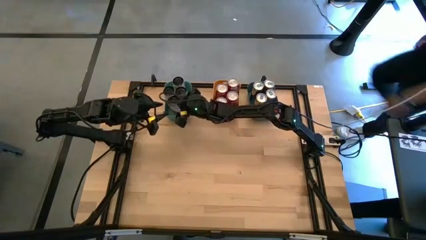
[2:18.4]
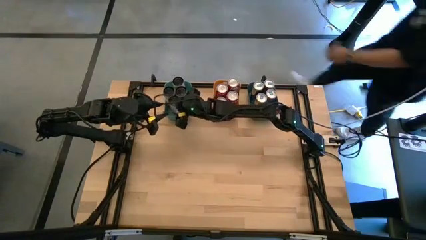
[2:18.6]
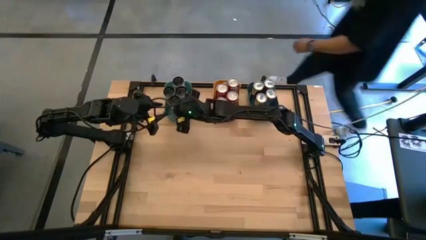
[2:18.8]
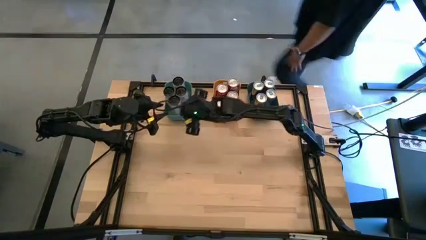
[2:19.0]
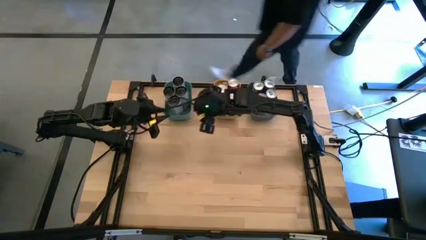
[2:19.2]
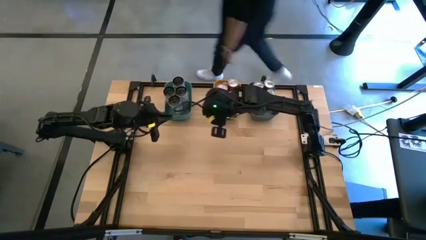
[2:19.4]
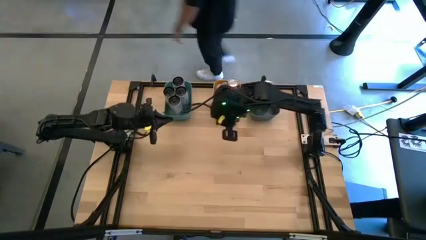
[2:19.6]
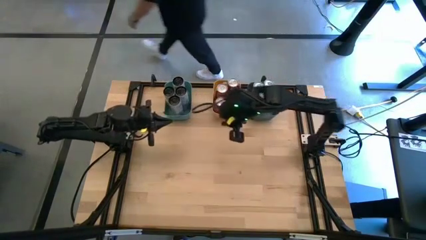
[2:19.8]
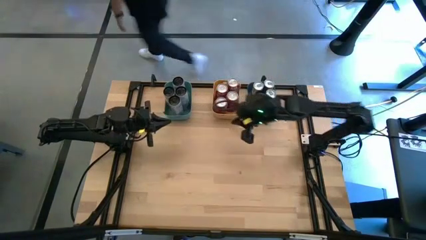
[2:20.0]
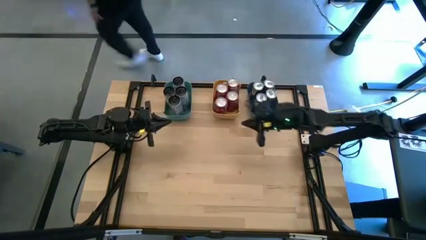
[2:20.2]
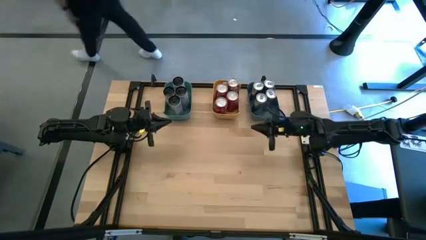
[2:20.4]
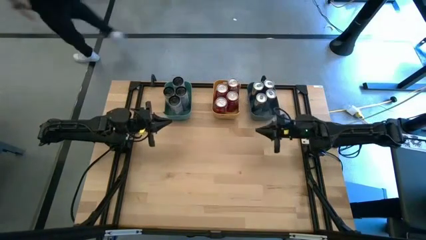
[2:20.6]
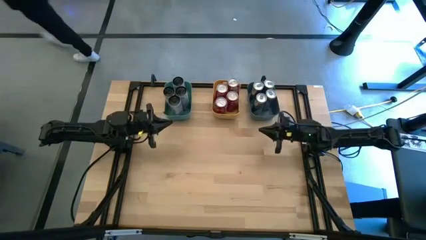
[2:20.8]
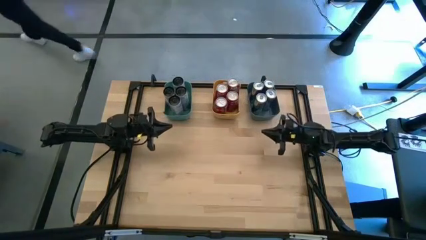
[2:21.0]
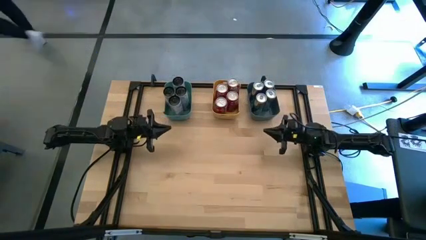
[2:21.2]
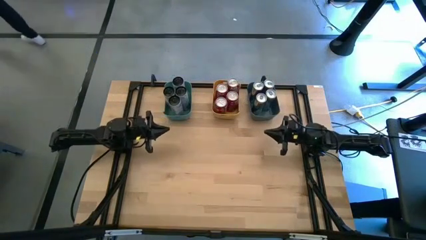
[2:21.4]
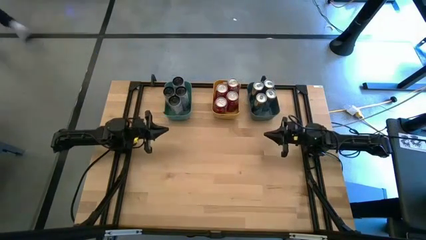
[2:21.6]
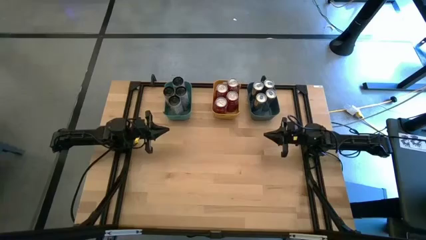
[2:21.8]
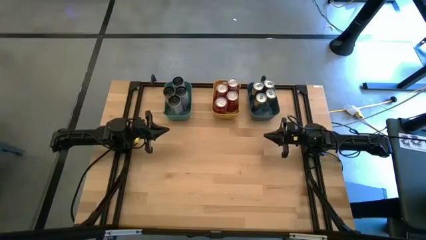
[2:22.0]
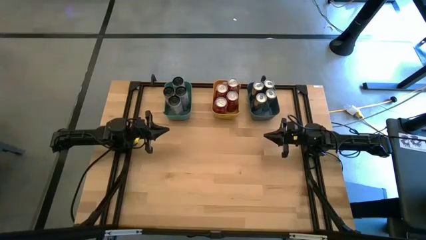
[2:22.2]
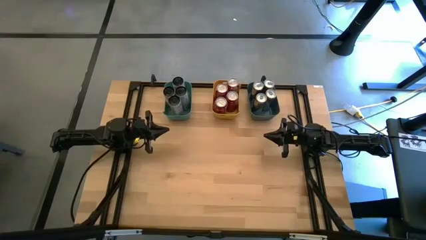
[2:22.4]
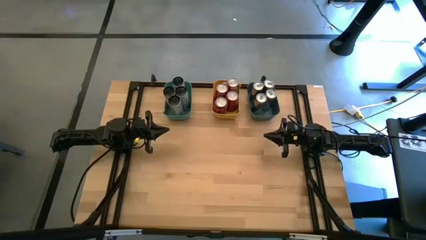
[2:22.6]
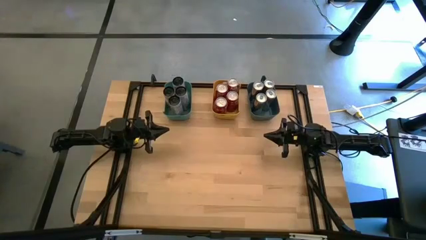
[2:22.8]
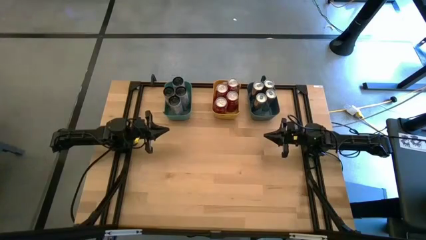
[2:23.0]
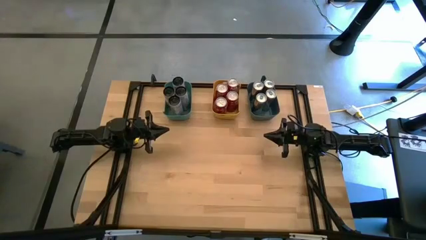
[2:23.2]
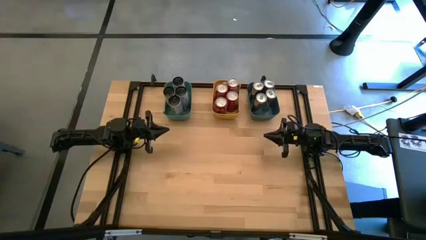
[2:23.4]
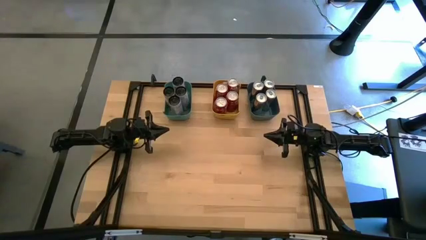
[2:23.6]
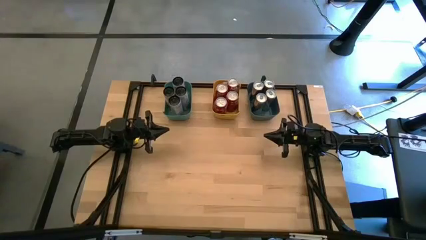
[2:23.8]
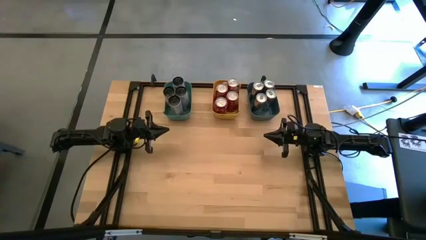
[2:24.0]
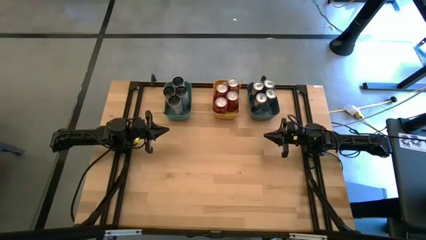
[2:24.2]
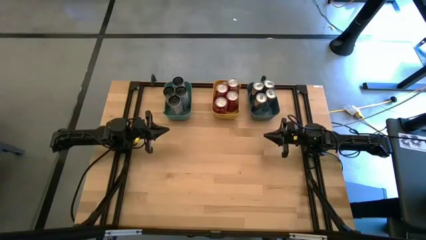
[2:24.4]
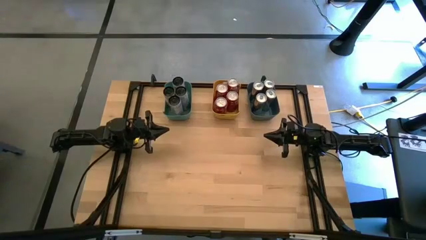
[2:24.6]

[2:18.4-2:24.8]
Task: Sort soda cans
Return to Home Position

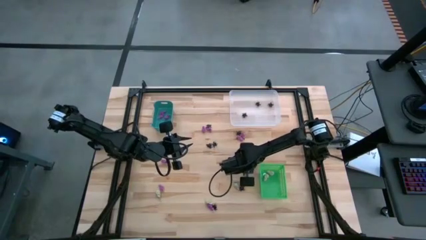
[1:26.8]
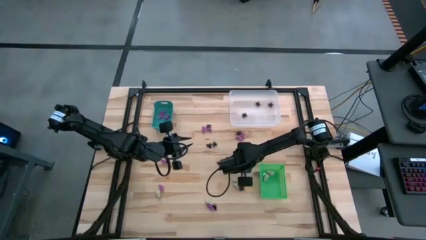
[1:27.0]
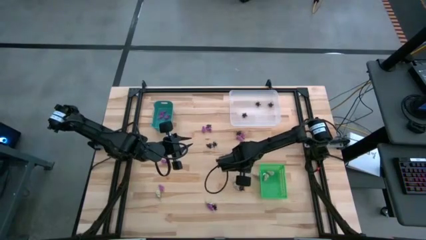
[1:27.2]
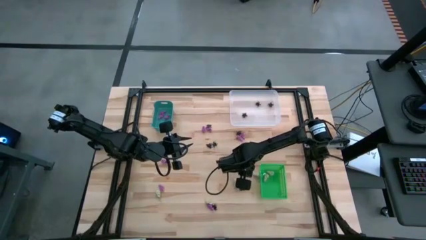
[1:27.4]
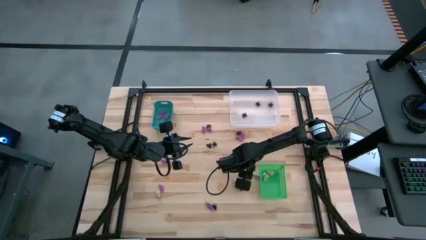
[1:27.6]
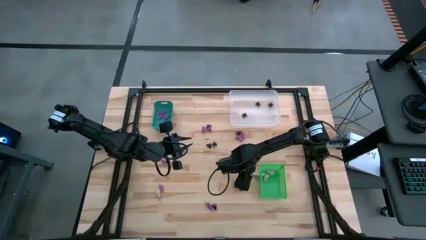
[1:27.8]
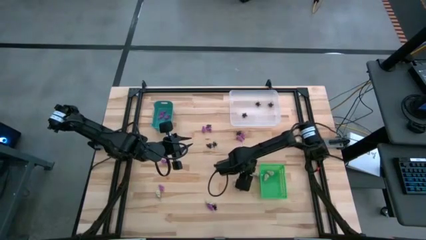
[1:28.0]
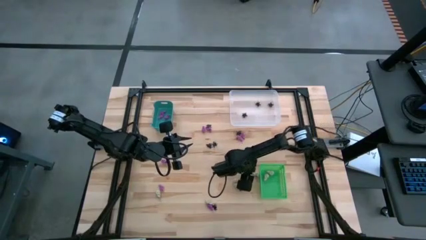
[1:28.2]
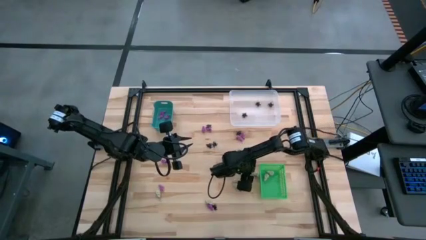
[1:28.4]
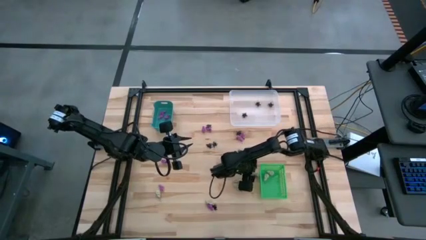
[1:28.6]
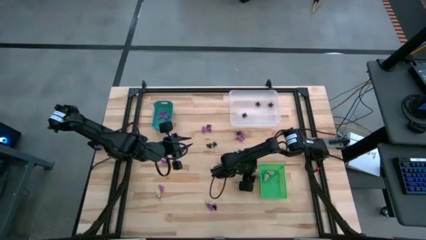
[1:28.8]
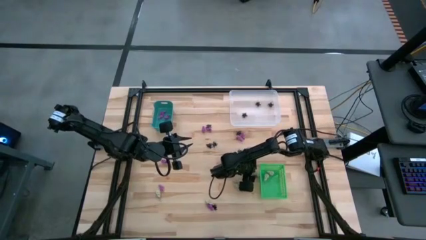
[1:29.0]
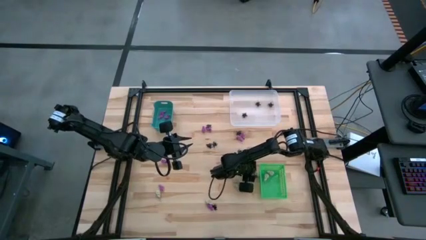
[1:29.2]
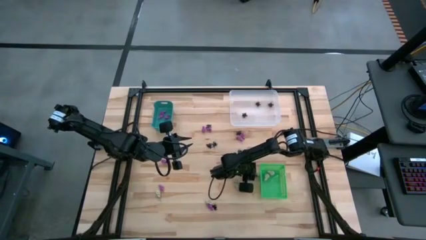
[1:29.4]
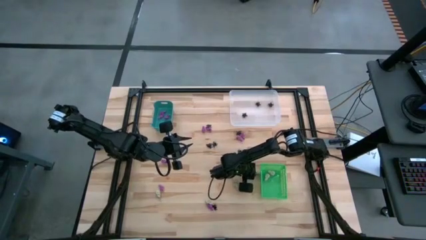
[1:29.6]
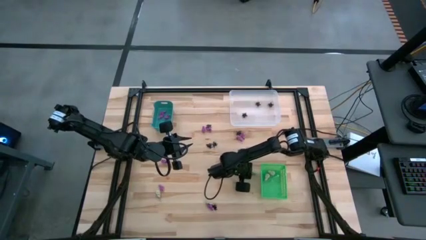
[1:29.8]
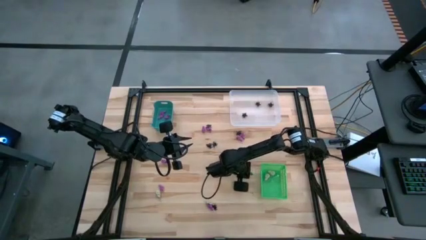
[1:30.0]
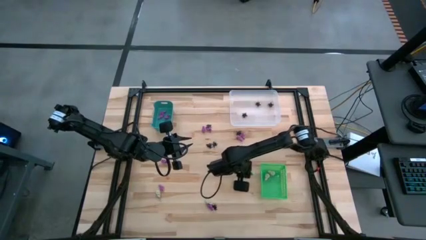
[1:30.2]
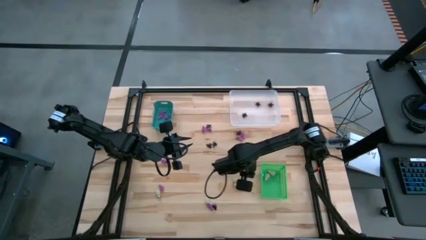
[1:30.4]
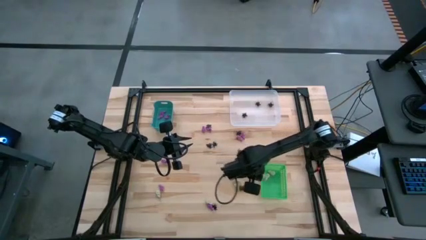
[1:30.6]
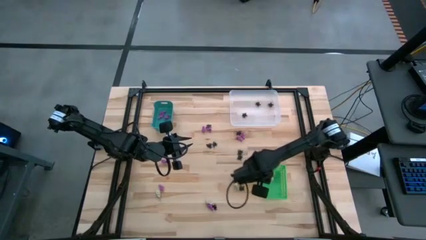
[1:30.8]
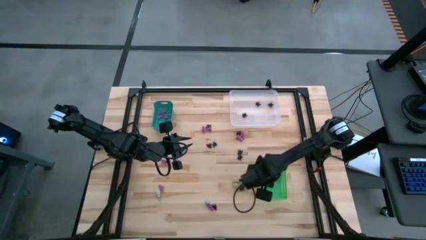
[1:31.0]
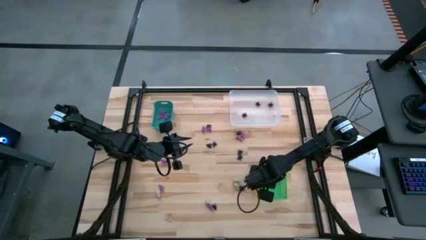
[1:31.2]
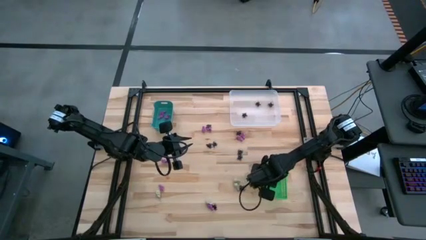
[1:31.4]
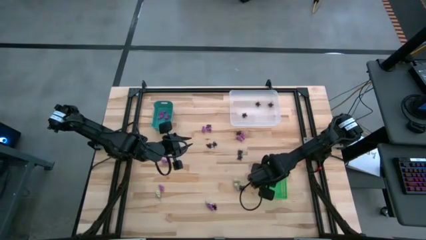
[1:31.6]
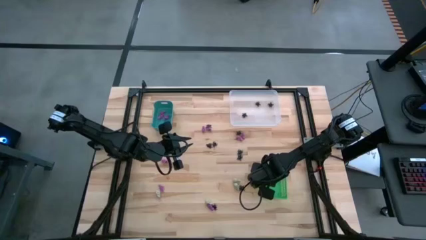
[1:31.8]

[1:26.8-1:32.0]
Task: Sort Halloween decoration
Put the white skull toy into the green bin

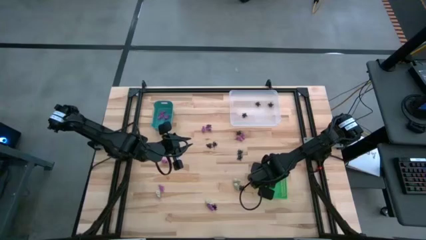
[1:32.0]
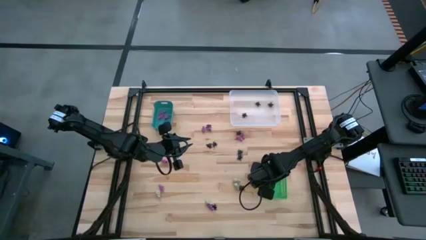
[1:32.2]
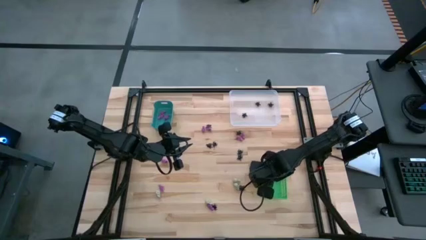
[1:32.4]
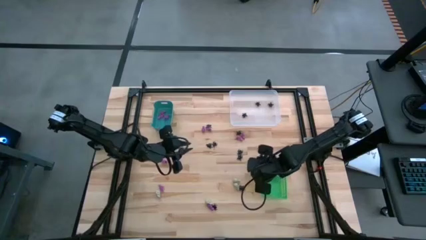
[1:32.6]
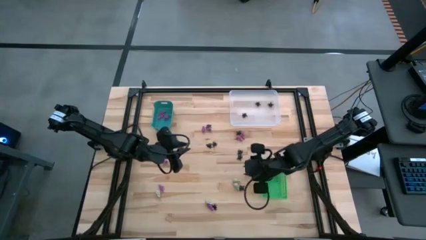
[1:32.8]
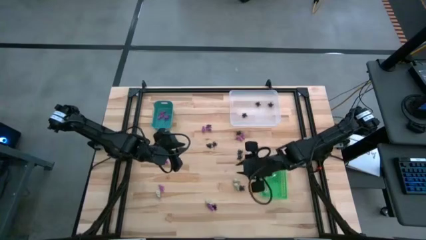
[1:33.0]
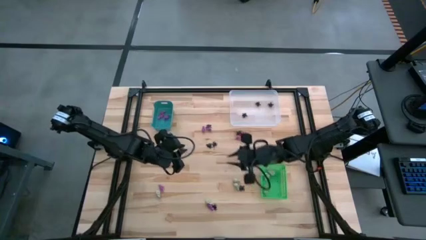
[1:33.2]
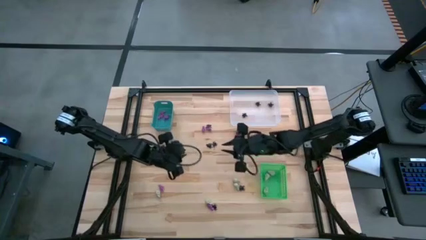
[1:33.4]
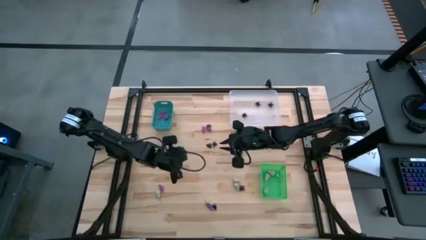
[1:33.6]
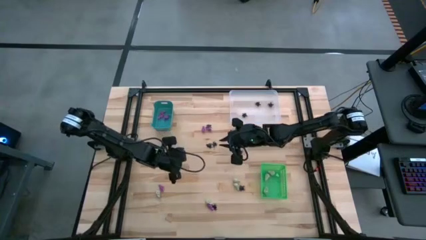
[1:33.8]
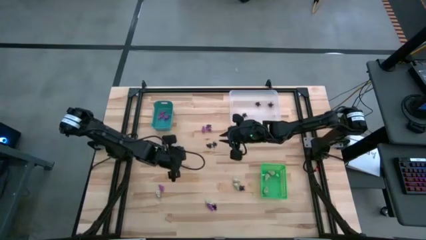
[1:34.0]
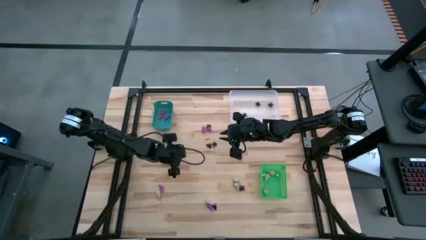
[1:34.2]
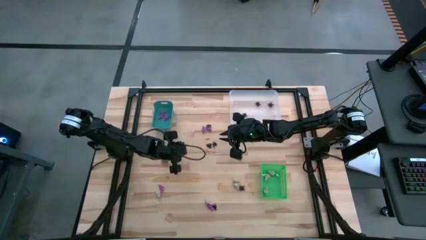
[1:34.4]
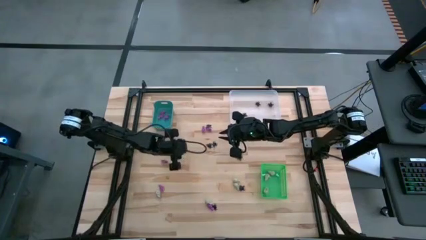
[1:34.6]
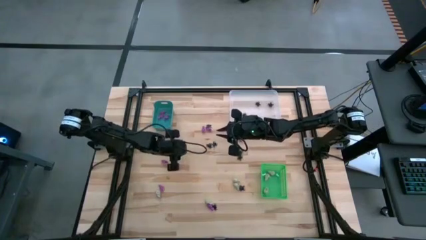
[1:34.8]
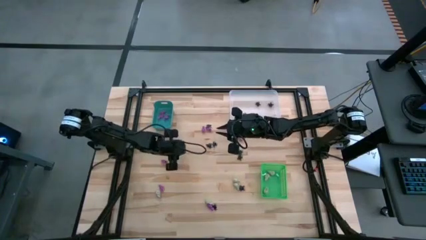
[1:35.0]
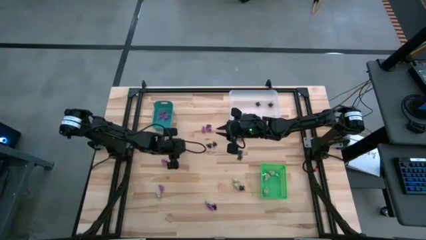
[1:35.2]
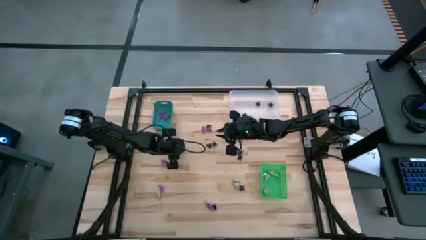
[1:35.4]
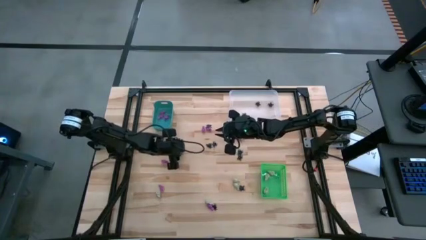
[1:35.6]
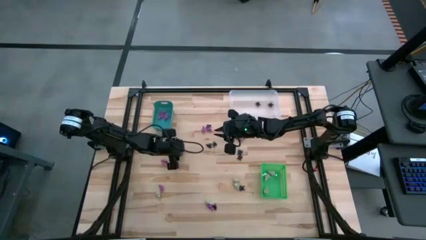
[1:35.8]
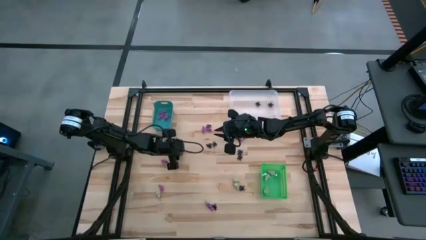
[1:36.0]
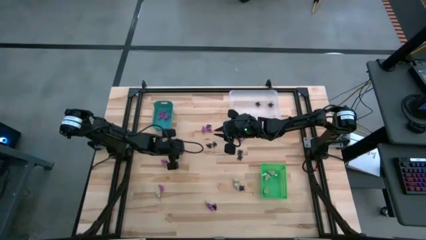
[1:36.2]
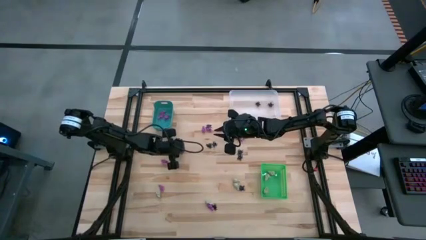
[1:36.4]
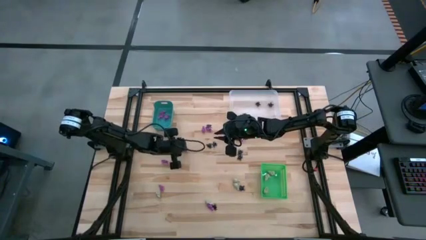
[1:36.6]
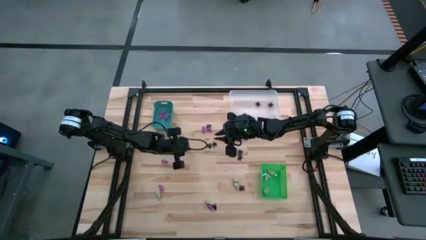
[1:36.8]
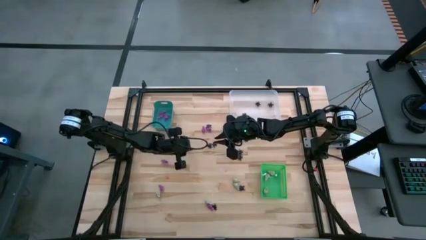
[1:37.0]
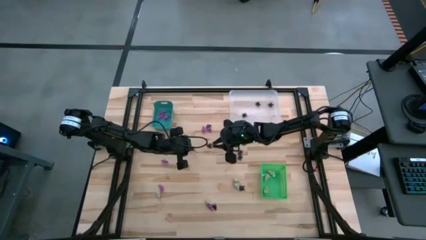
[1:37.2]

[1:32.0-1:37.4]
Put the black spider toy into the white bin
